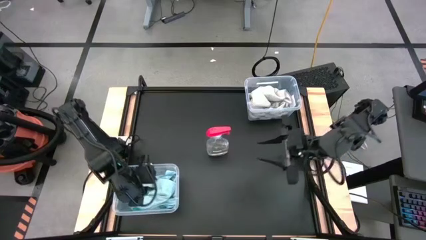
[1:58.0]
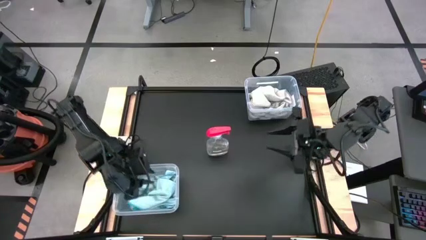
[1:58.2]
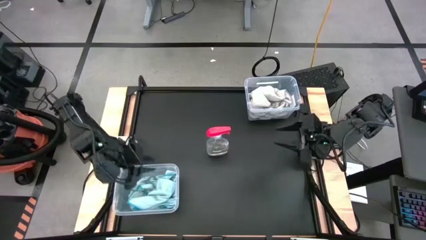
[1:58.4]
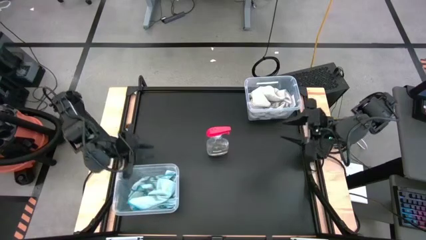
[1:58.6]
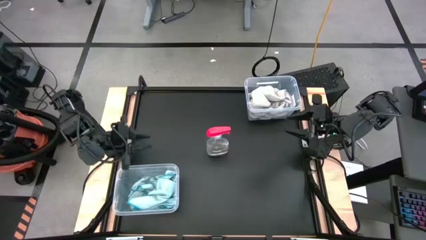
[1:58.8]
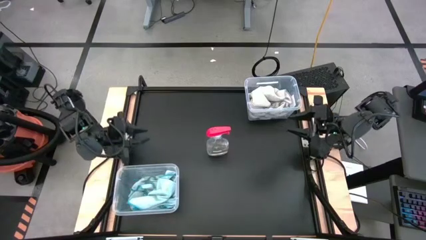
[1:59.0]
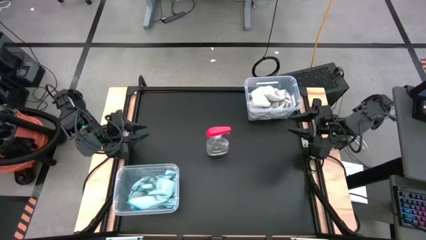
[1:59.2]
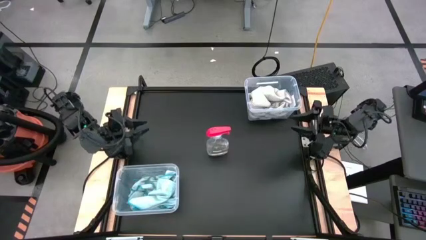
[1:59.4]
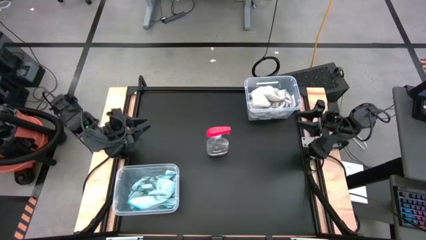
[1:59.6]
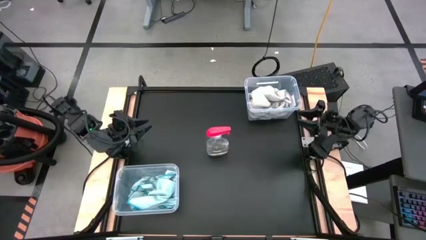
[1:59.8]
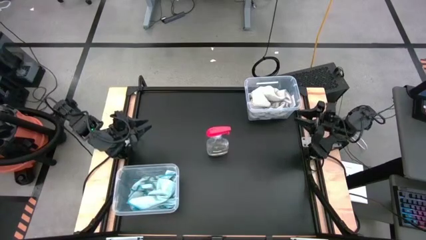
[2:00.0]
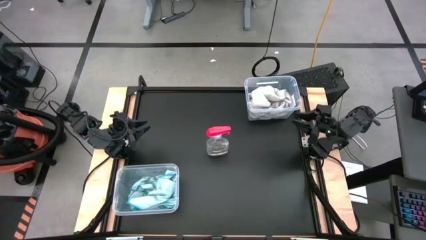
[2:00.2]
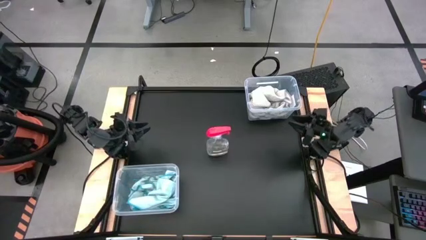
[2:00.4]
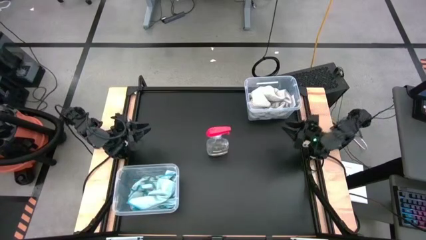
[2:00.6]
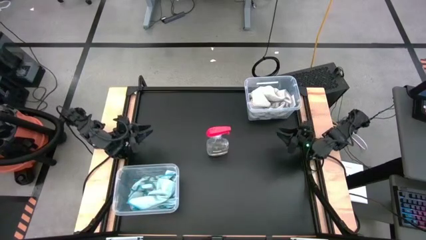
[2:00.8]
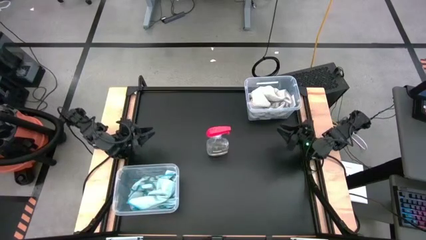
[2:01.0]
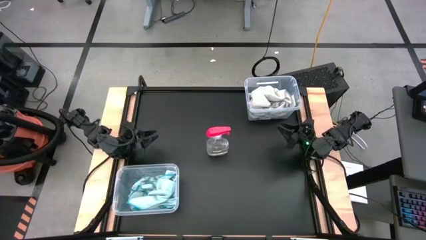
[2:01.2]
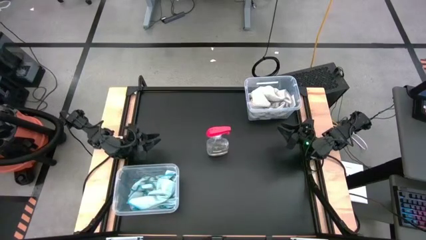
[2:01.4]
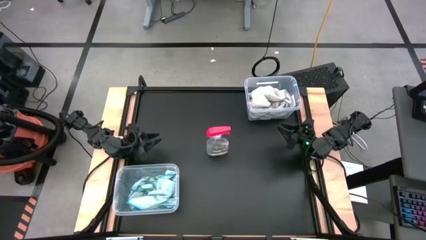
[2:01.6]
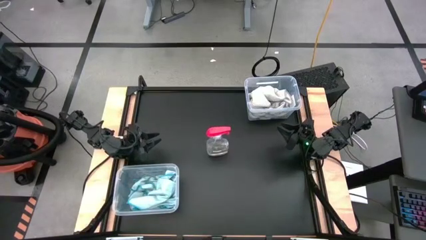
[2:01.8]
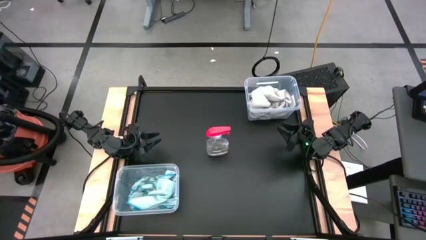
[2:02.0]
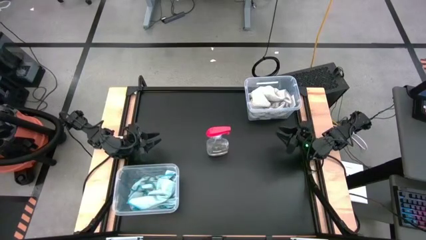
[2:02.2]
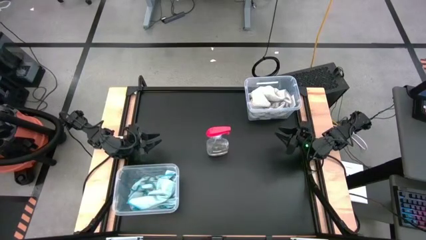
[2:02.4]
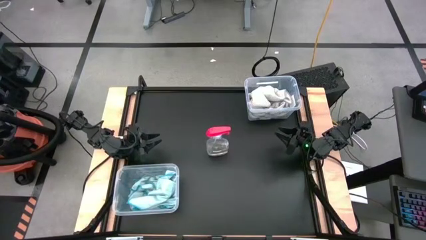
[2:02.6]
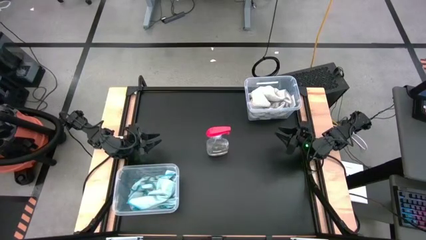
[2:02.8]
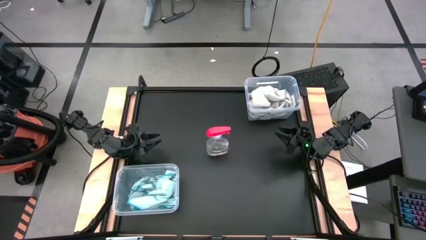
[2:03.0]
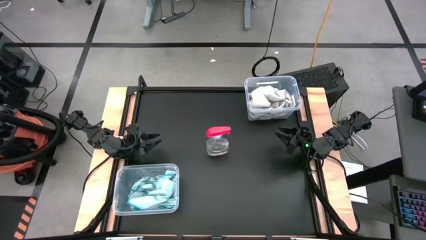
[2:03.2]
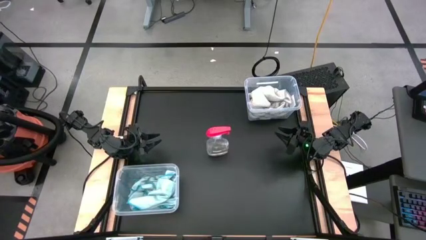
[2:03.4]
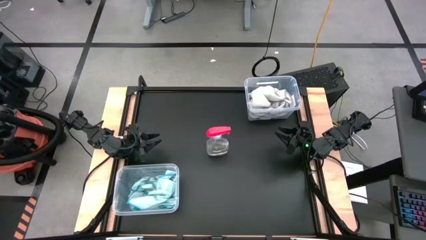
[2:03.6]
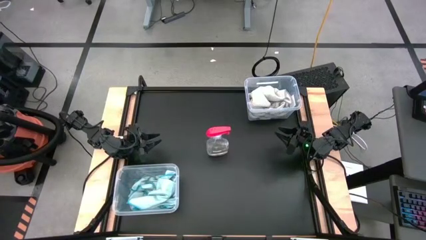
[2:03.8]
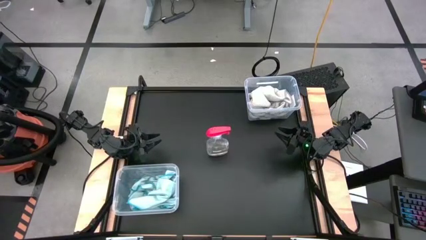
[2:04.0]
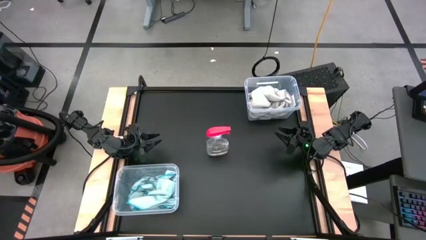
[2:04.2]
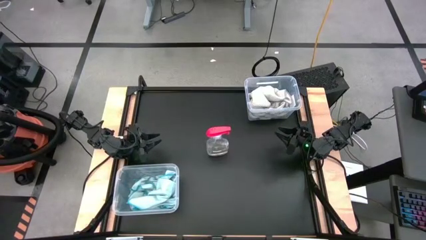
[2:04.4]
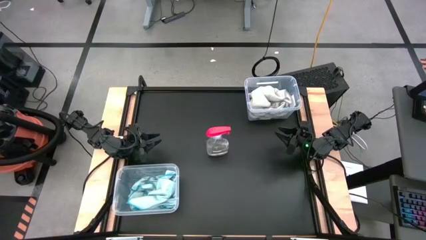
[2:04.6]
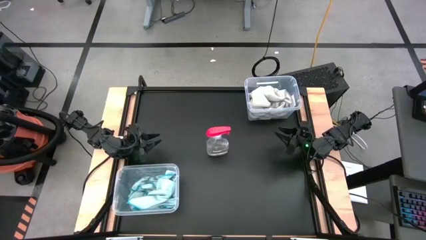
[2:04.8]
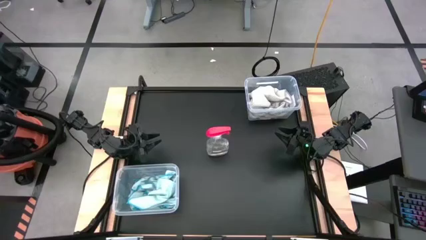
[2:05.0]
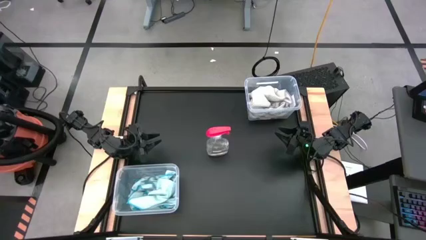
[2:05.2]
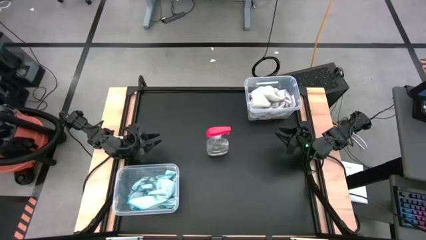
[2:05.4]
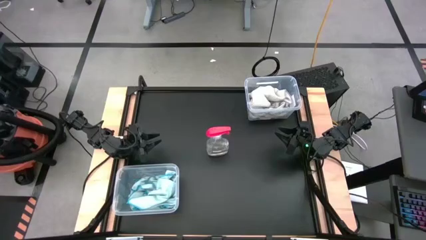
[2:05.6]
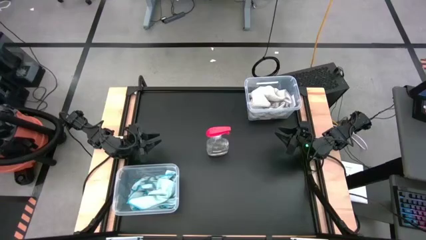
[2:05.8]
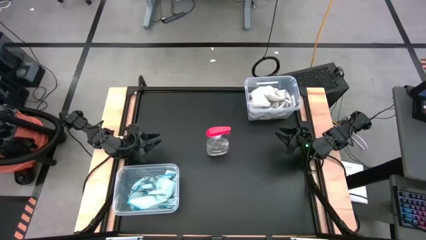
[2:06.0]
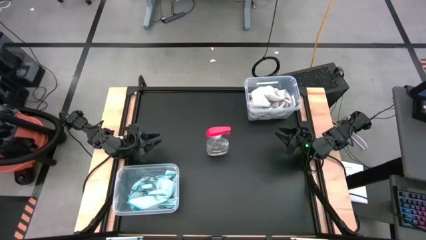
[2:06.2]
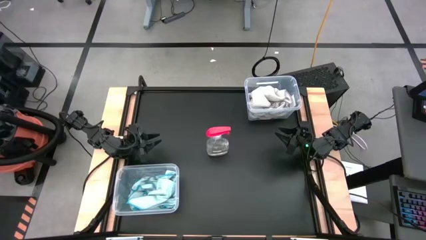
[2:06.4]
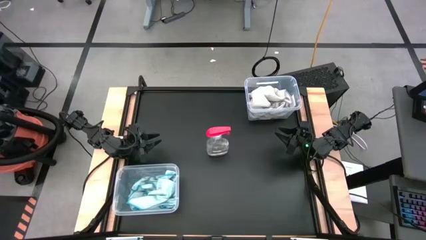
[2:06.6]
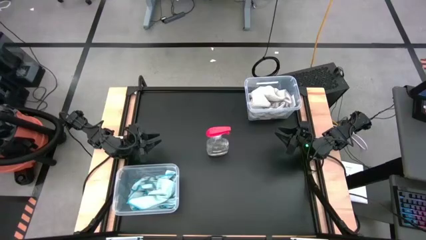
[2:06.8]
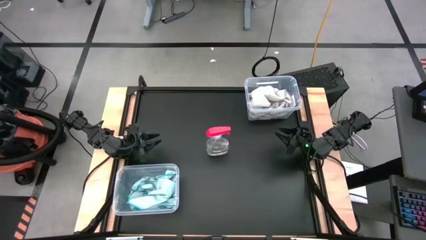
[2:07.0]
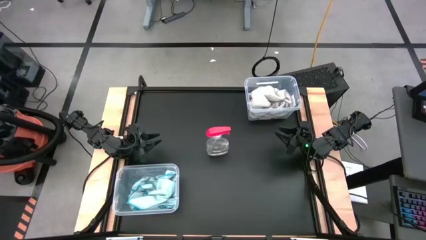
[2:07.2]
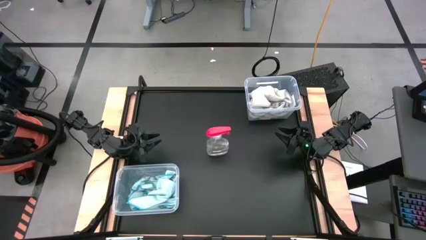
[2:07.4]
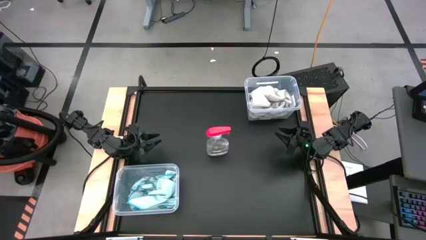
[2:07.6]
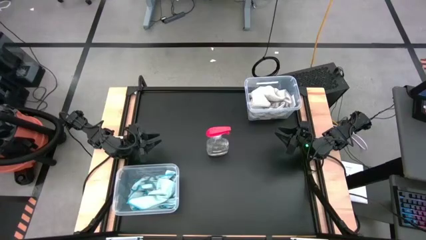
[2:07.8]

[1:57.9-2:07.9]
Task: Sort microfiber towel by color & place in baskets
Return to home position

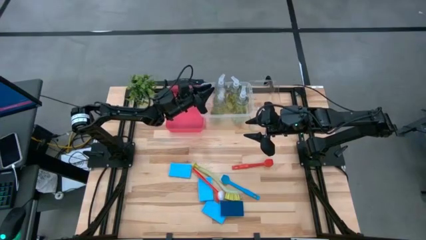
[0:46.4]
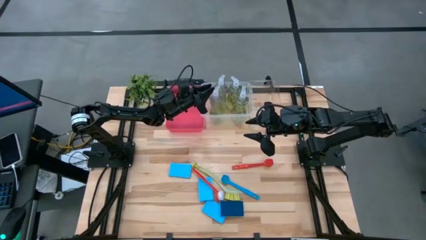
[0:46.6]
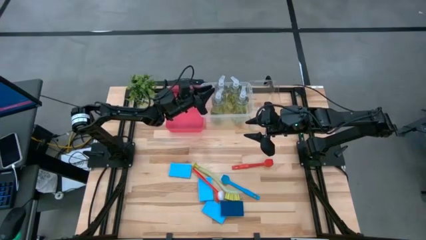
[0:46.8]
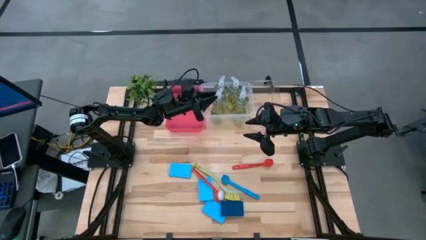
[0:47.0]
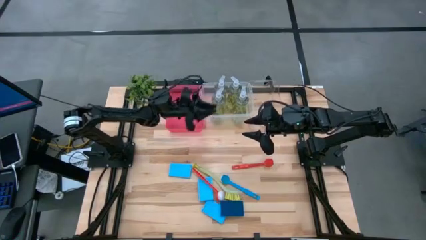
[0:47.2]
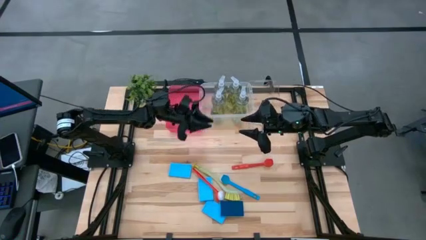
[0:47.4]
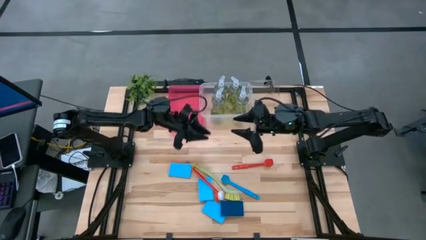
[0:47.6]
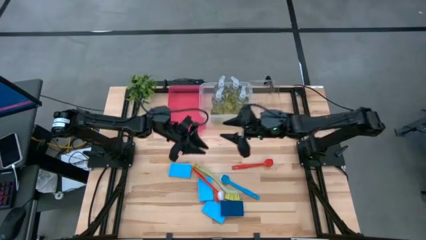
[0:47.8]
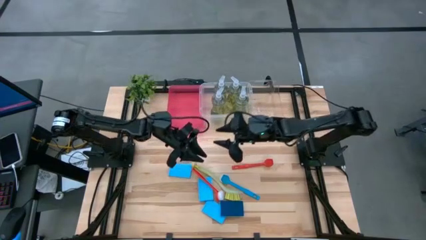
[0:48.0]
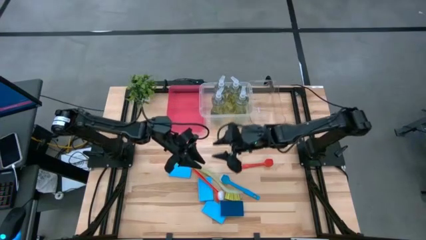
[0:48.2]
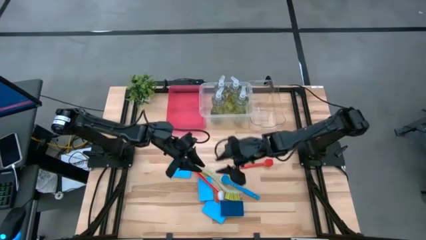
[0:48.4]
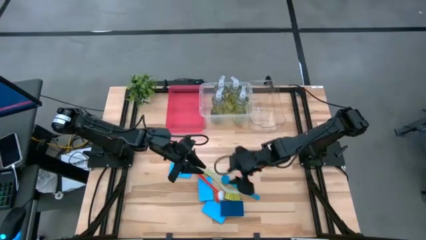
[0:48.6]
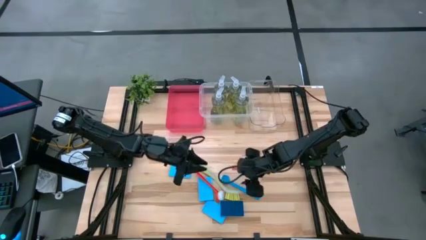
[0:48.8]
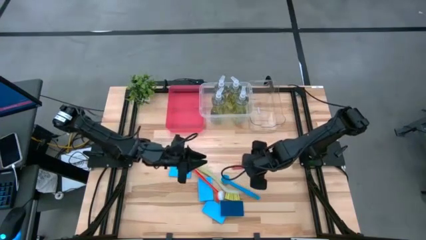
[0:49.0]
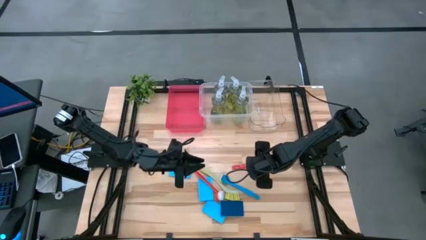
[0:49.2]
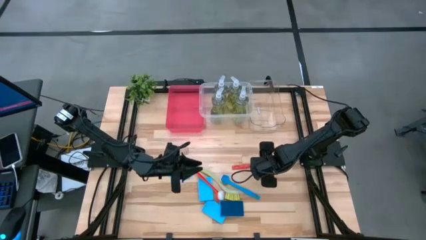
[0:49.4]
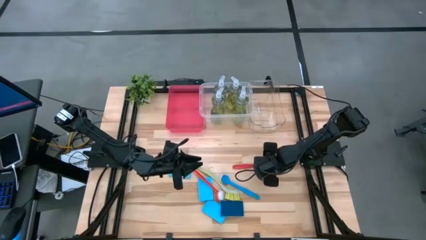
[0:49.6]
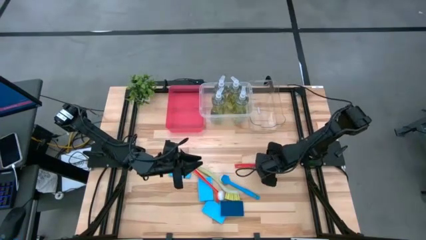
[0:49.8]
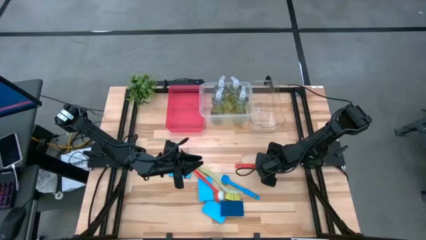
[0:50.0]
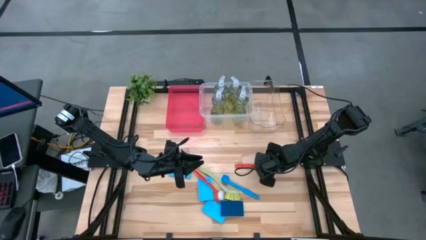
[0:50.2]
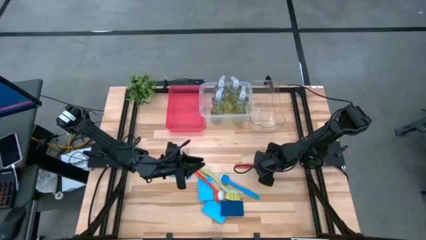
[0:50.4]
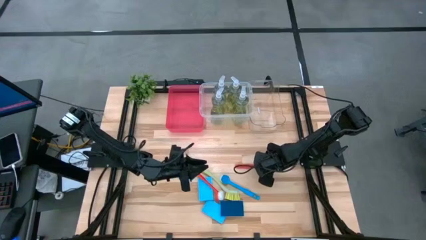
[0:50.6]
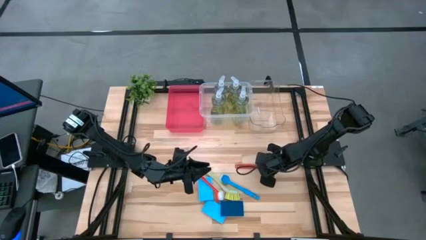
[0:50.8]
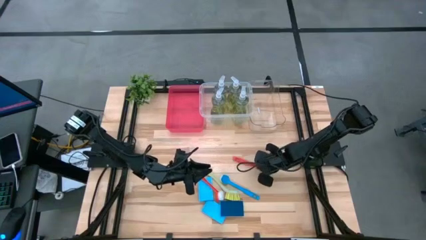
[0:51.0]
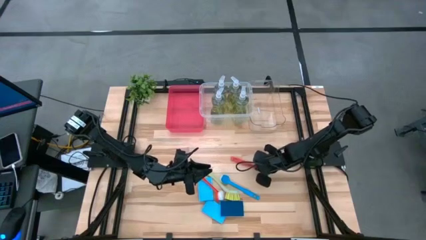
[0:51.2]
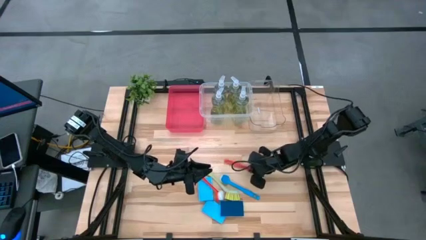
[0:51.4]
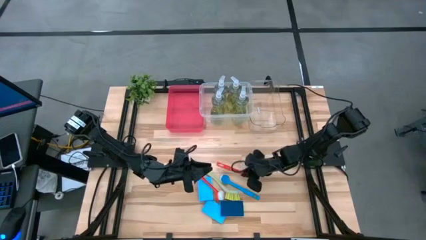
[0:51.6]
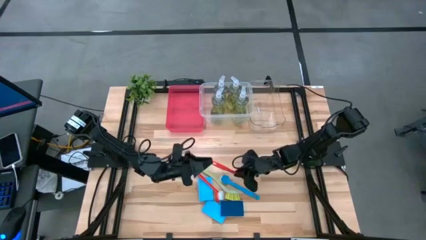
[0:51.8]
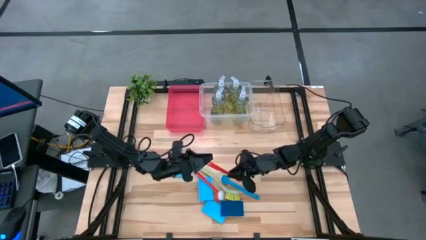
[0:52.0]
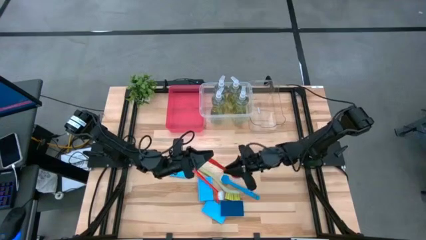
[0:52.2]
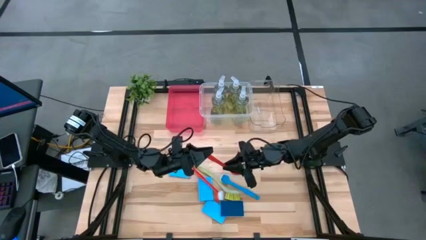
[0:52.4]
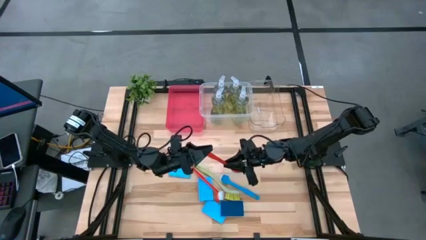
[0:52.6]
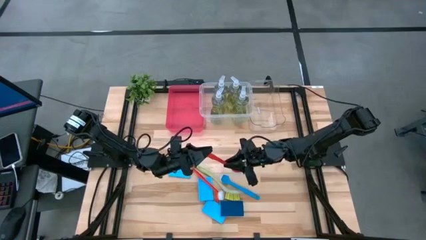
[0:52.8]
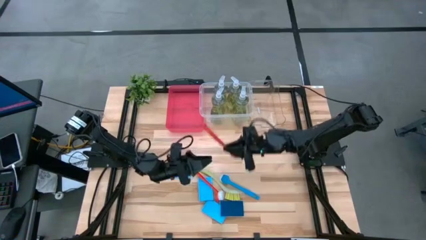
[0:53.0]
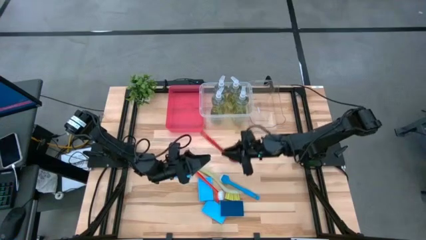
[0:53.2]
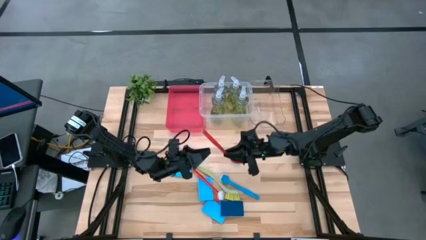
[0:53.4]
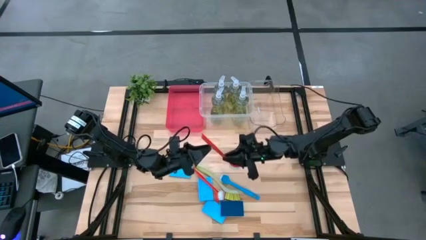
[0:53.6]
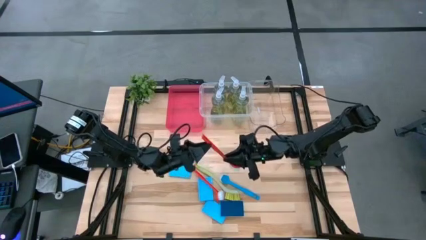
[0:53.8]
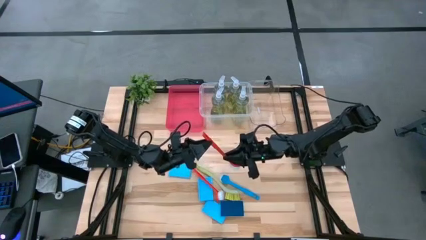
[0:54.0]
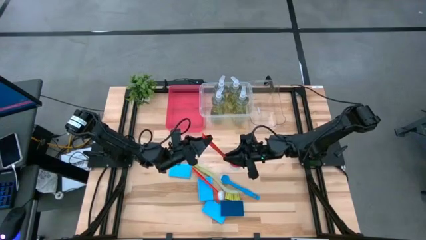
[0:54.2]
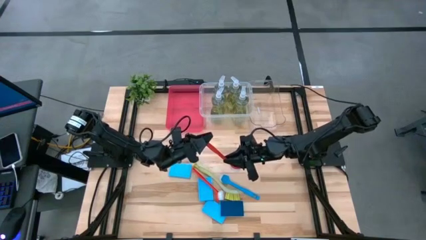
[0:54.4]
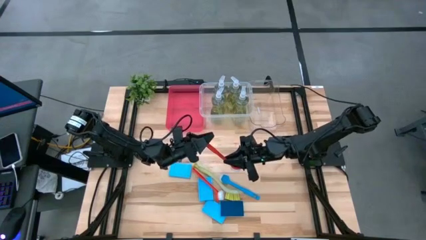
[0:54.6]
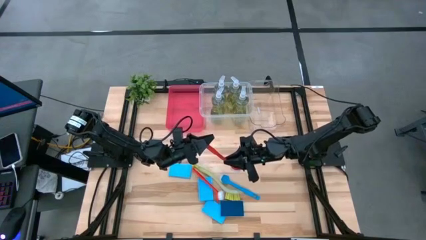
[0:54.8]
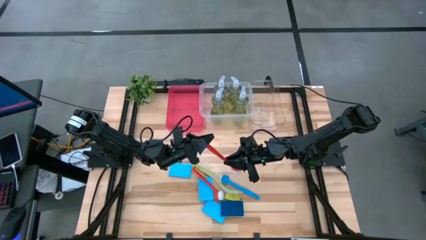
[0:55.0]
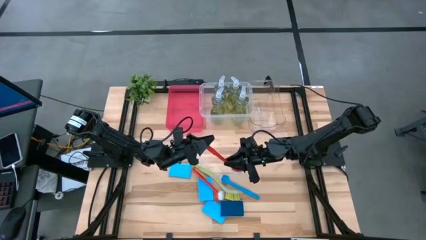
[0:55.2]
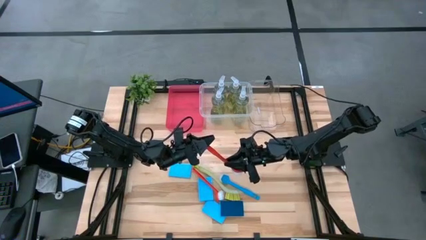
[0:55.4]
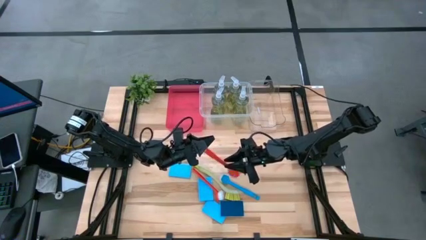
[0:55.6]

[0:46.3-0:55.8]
Task: Pick & Place Kitchen Sink Supplies
Put the red toilet brush into the red bin
